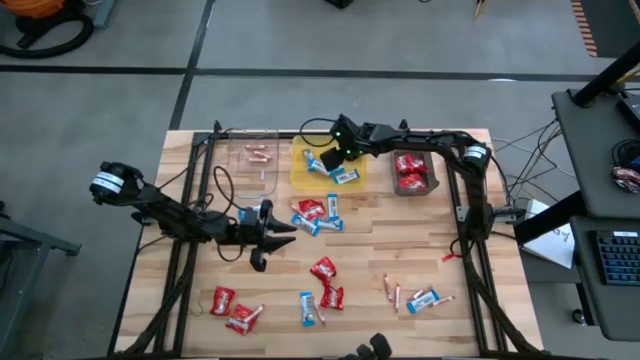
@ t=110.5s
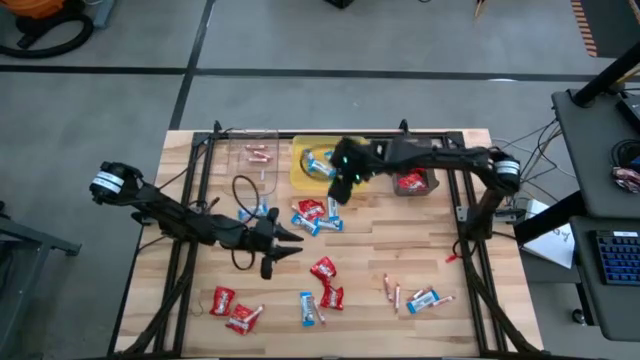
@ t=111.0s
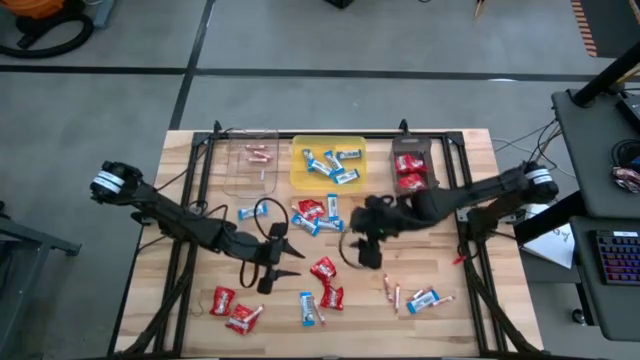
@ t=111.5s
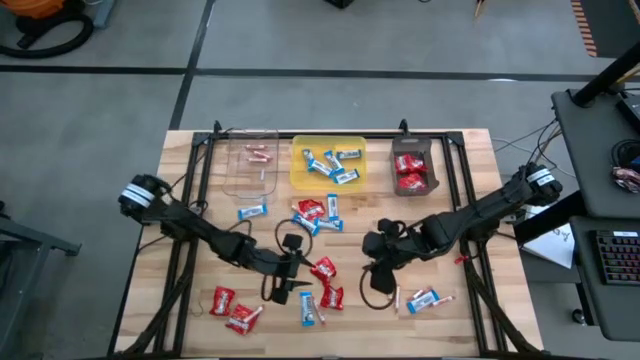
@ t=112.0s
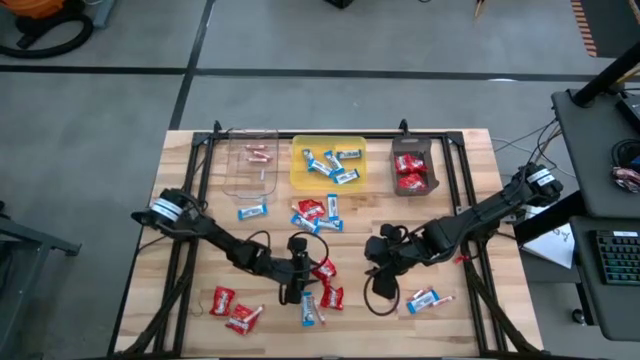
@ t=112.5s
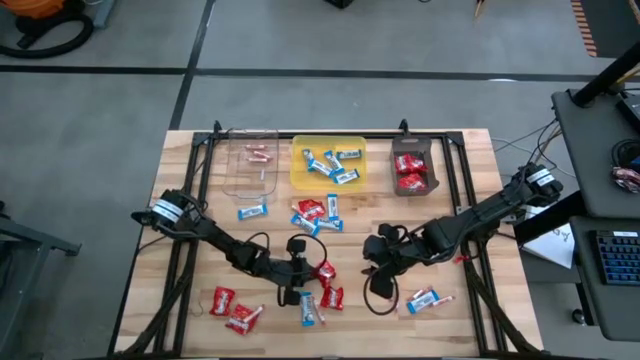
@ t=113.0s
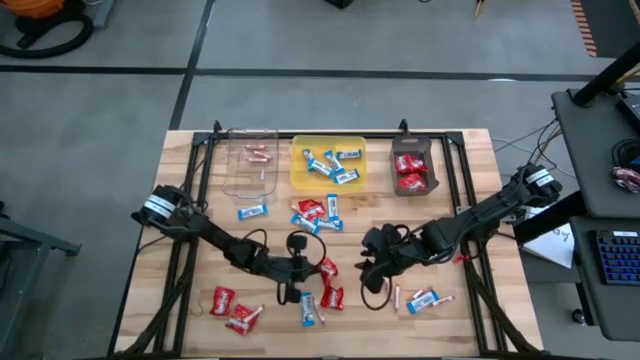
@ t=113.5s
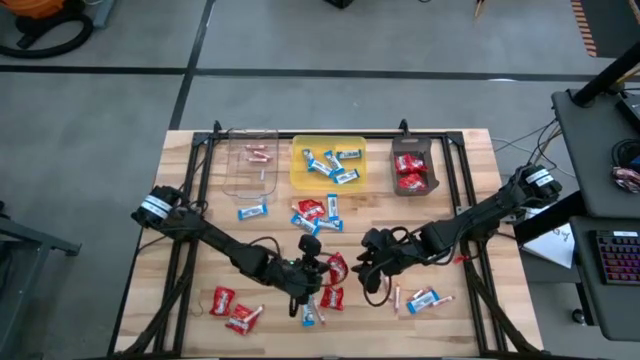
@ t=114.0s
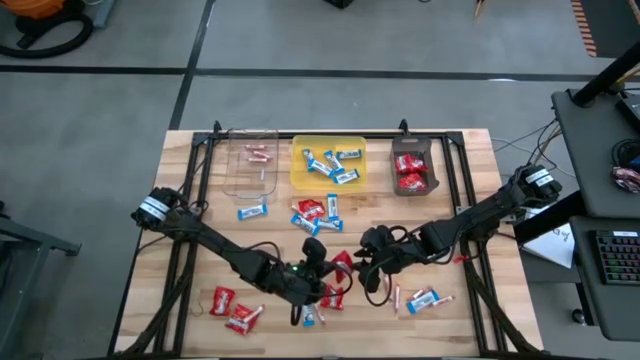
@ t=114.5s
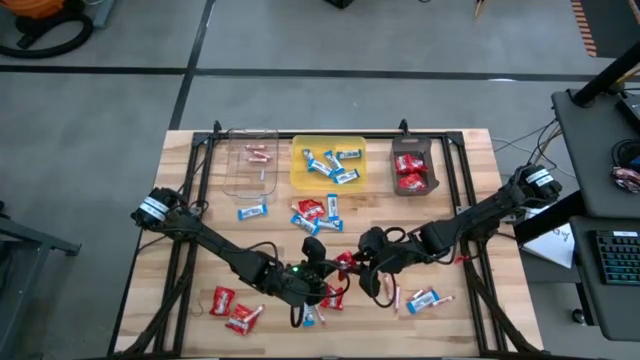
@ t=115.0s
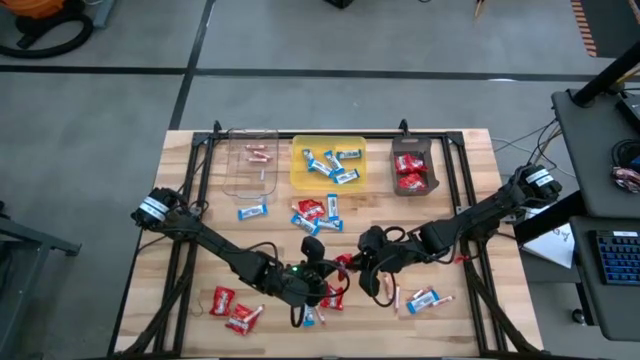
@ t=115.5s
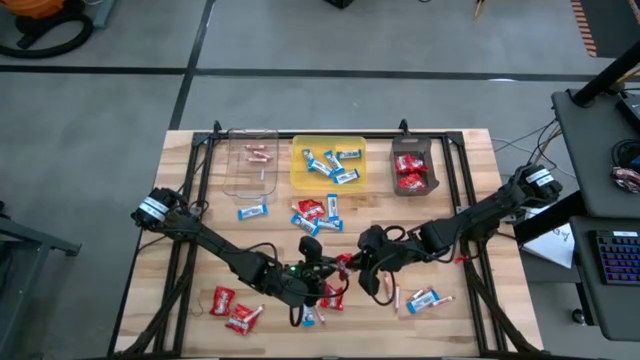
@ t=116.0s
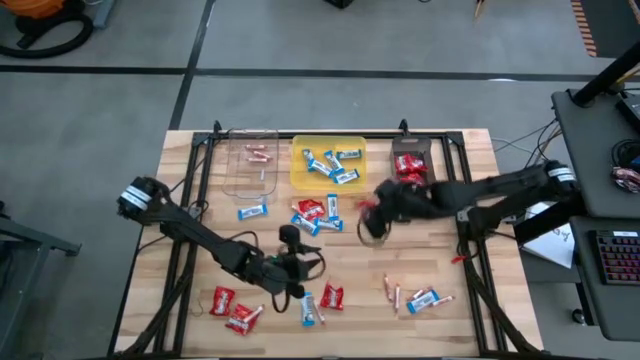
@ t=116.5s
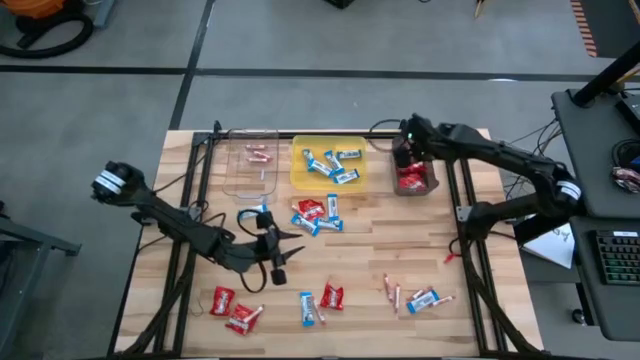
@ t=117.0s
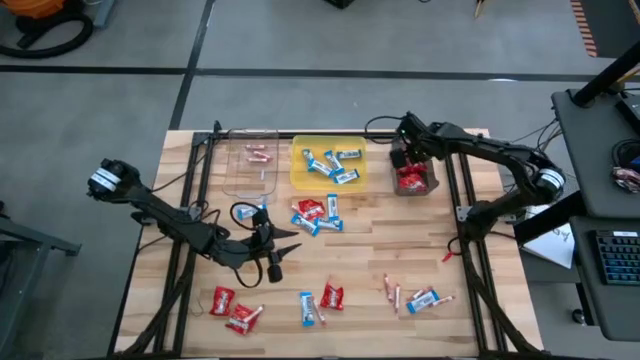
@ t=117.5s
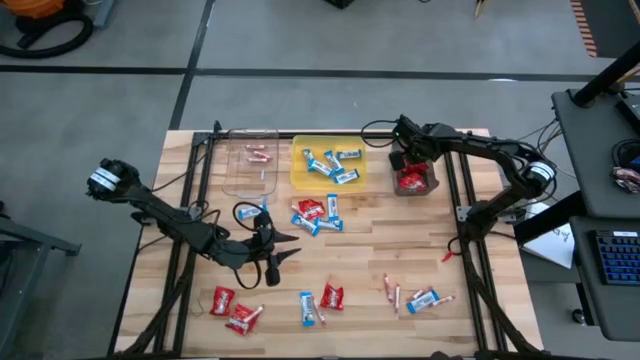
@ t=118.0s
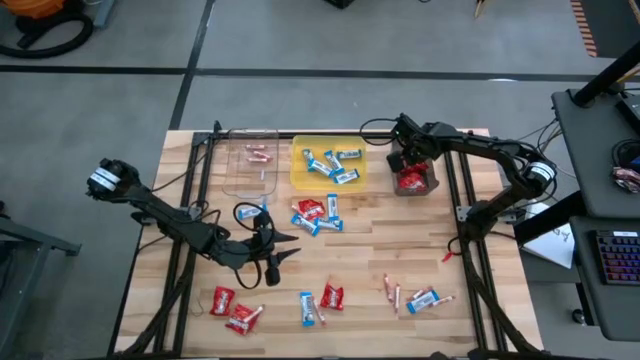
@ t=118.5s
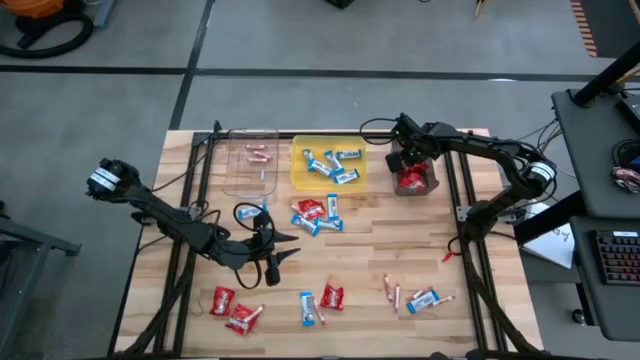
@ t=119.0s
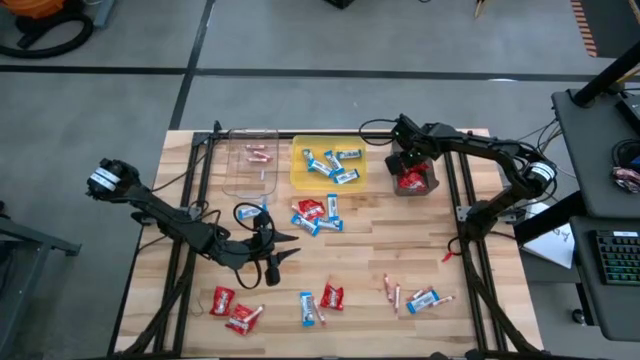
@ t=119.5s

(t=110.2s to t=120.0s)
Task: Sort candy
Put the red candy into the black bin

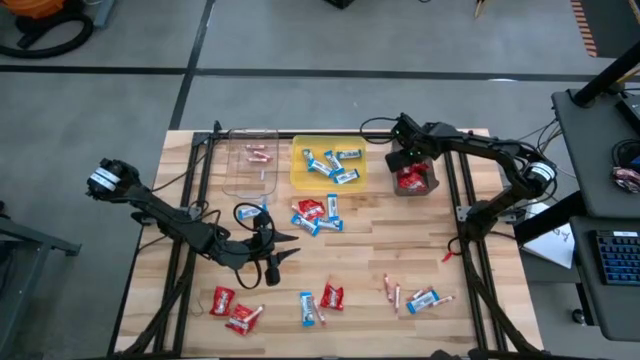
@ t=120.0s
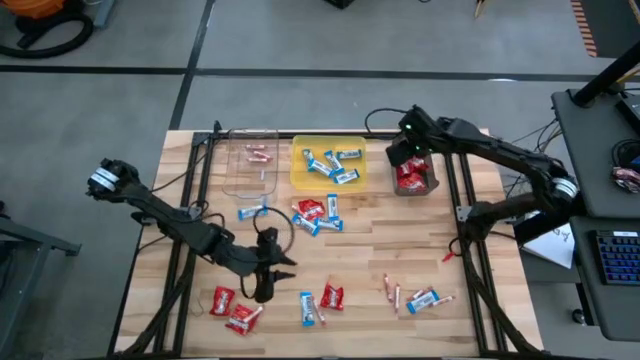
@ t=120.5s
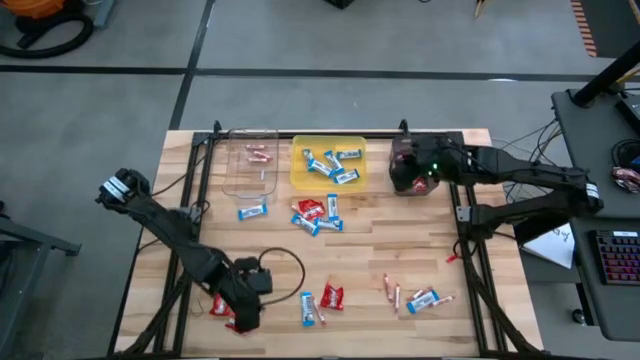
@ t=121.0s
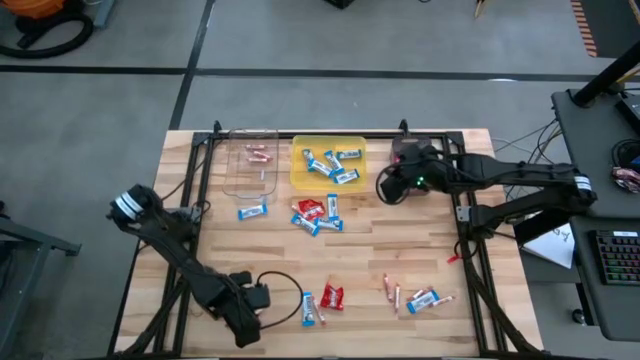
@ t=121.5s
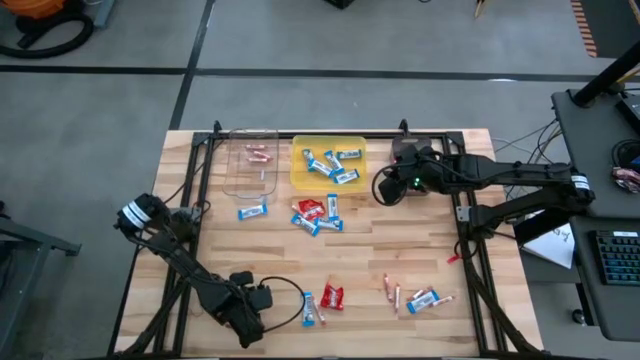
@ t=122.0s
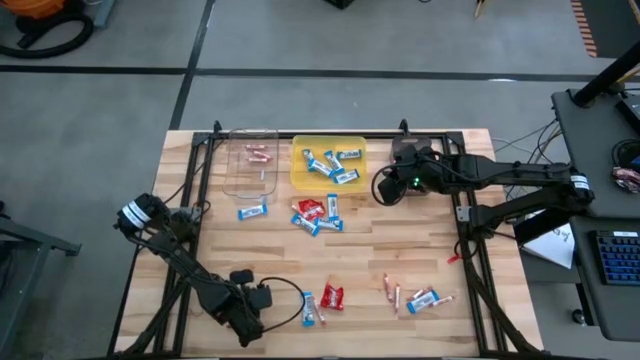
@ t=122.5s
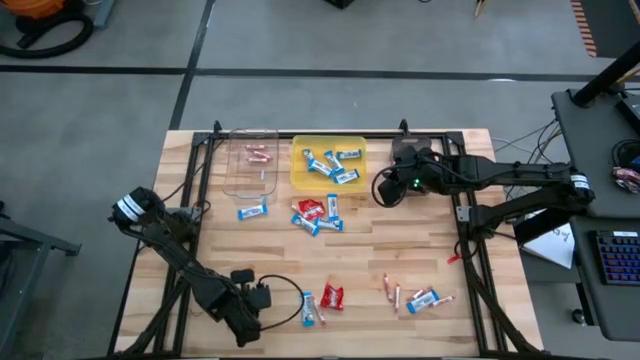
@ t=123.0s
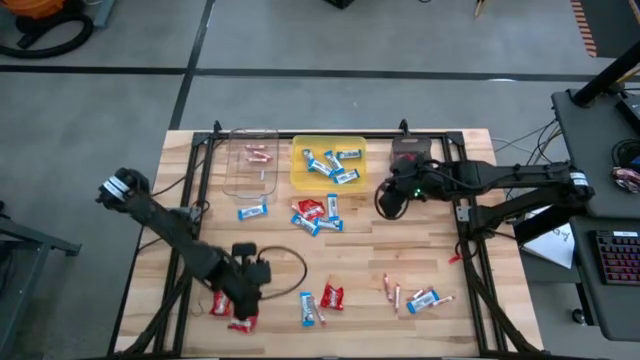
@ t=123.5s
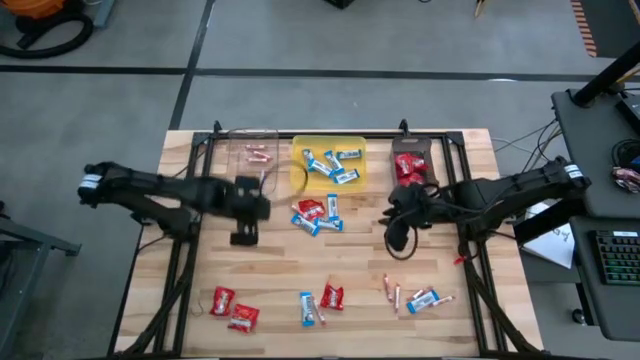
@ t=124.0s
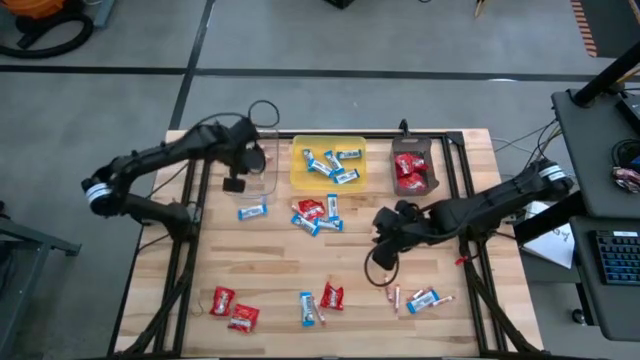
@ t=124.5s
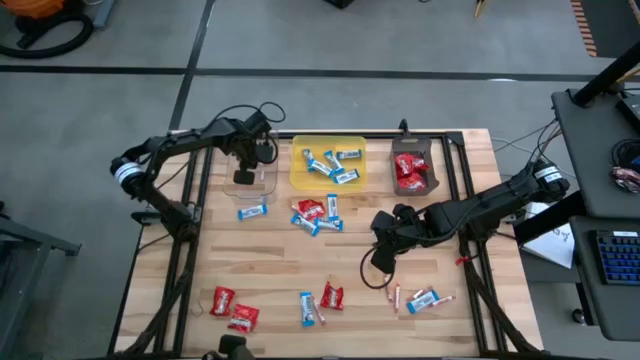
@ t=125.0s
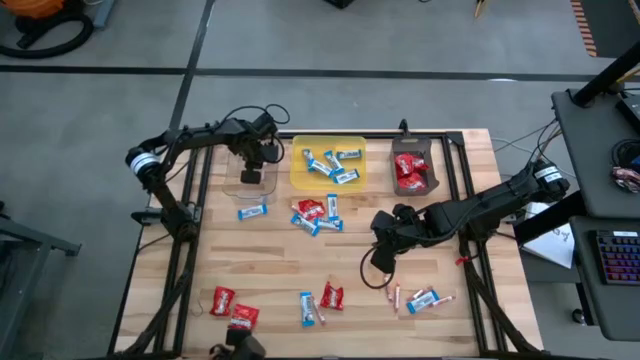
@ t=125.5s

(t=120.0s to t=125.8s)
Put the orange candy into the transparent bin

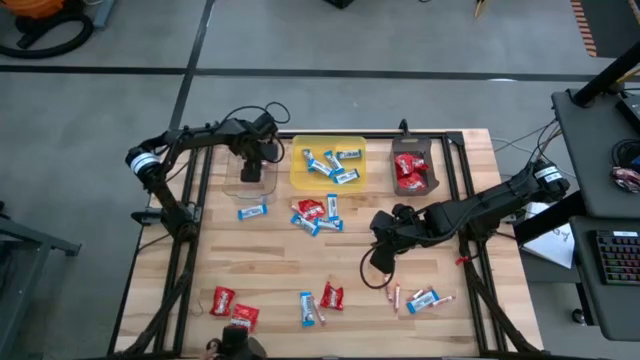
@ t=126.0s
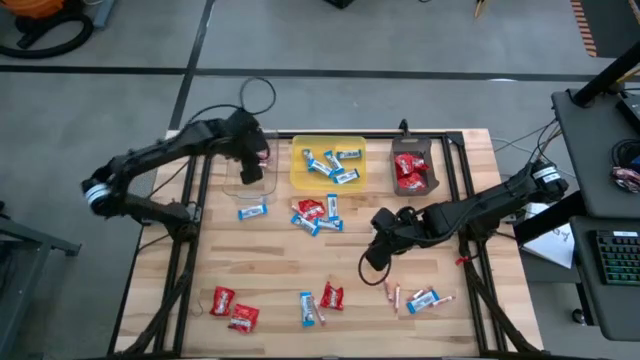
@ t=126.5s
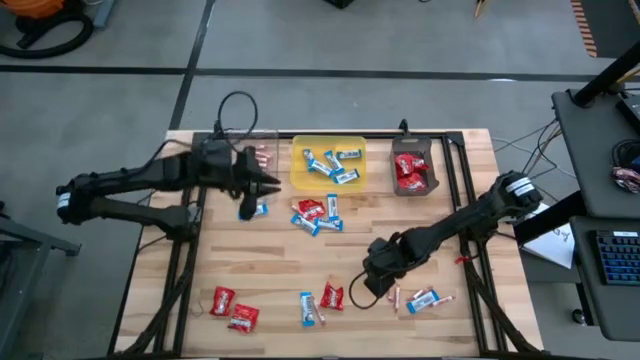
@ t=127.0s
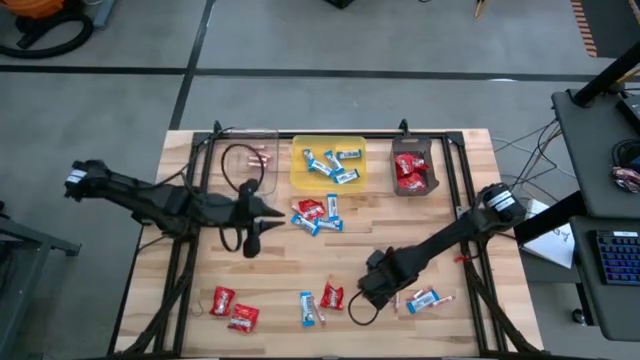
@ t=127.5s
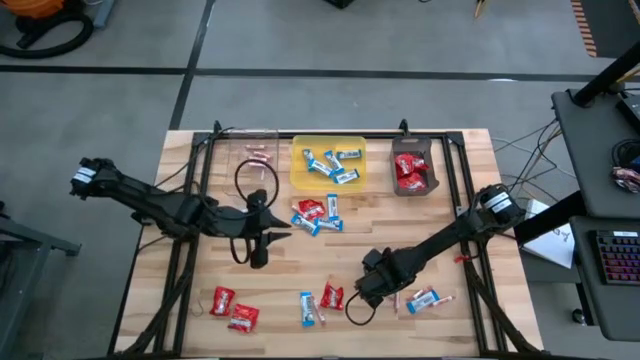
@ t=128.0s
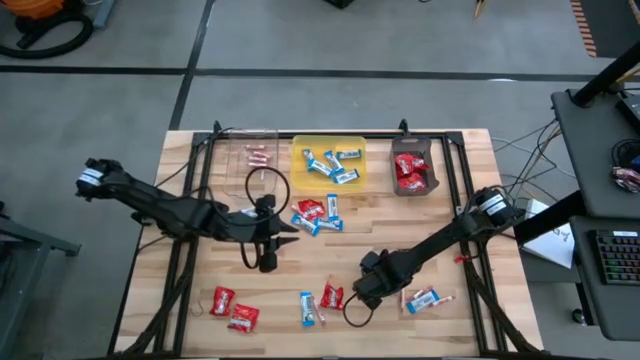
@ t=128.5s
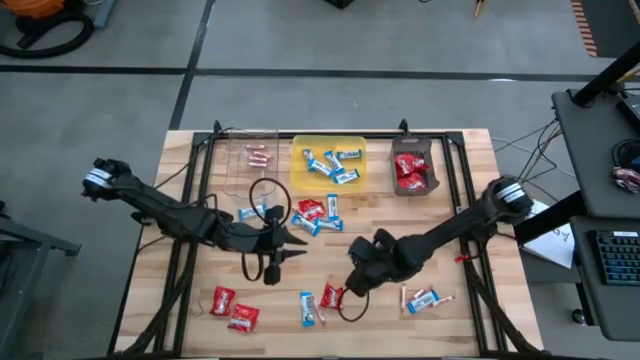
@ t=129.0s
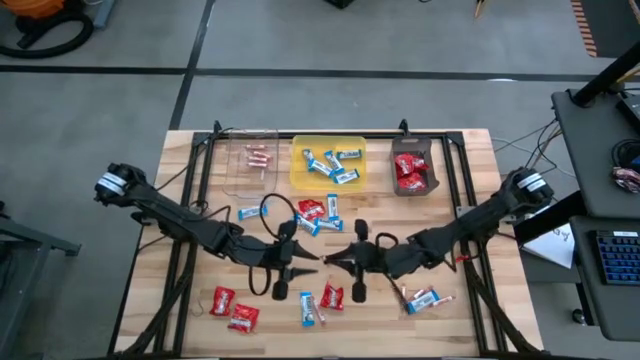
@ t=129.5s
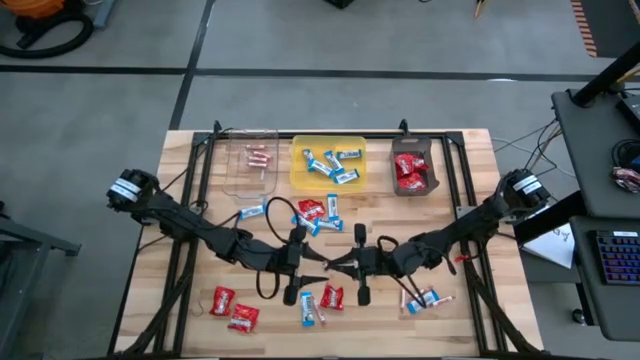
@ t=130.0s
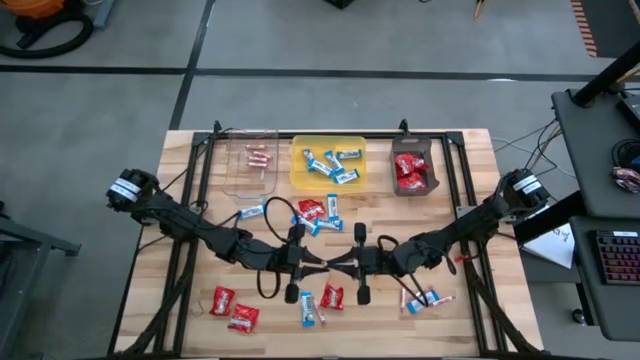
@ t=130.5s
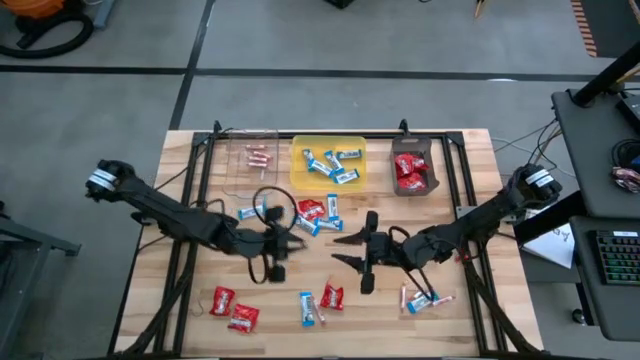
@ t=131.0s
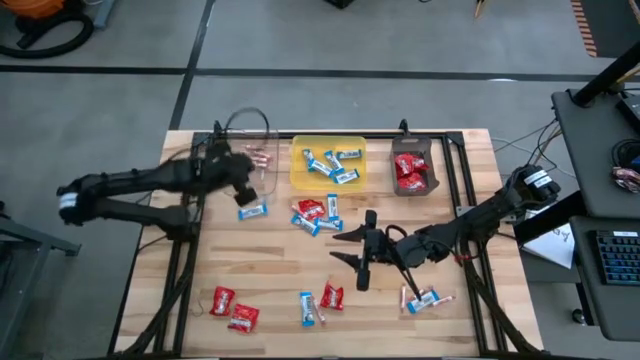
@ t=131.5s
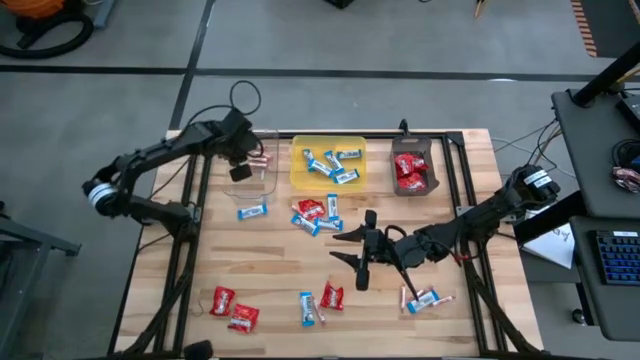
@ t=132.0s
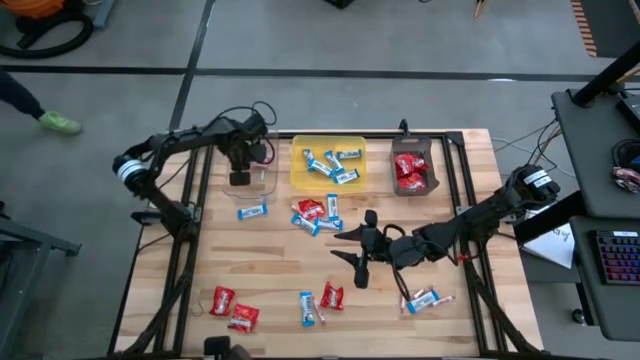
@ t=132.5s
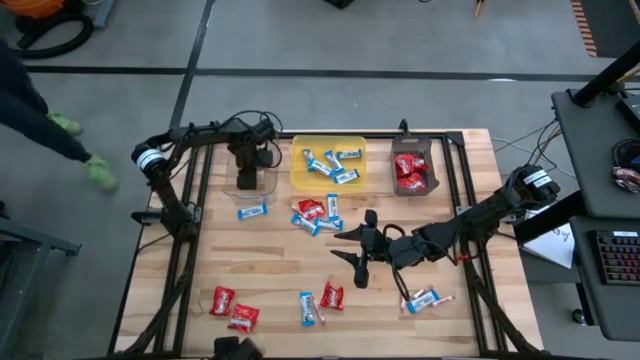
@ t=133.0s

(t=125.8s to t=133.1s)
Put the orange candy into the transparent bin
